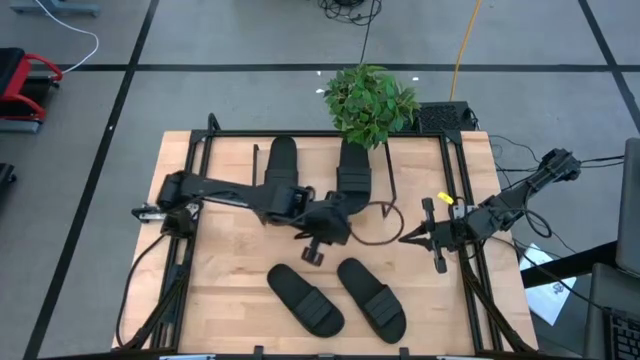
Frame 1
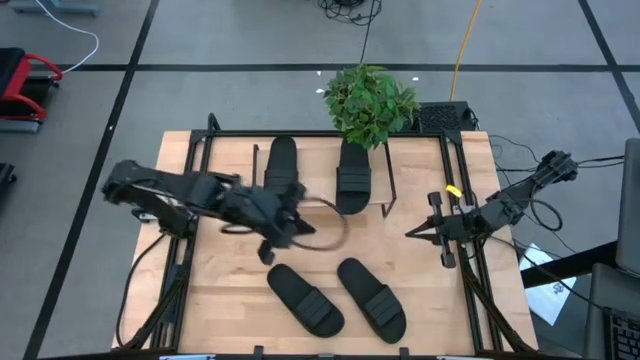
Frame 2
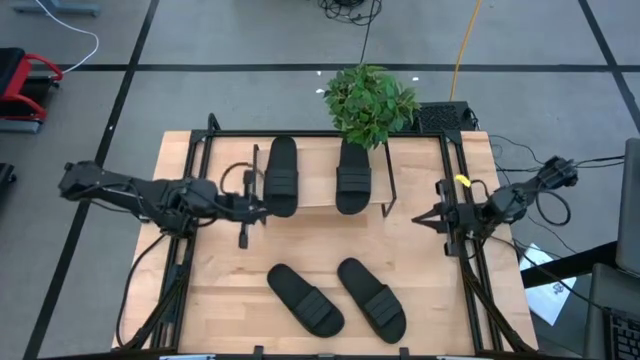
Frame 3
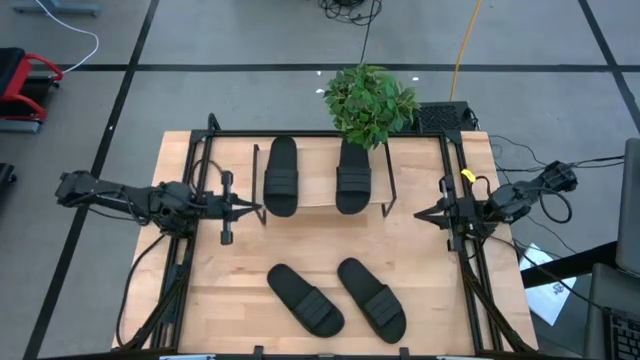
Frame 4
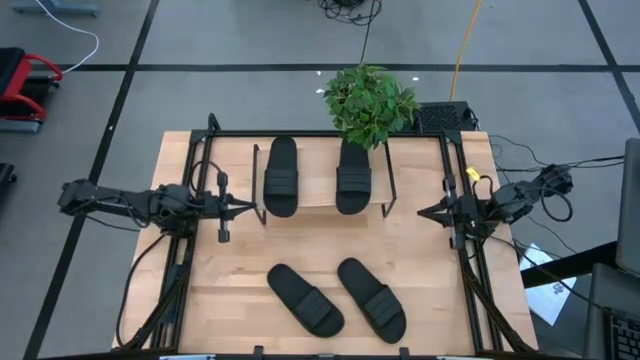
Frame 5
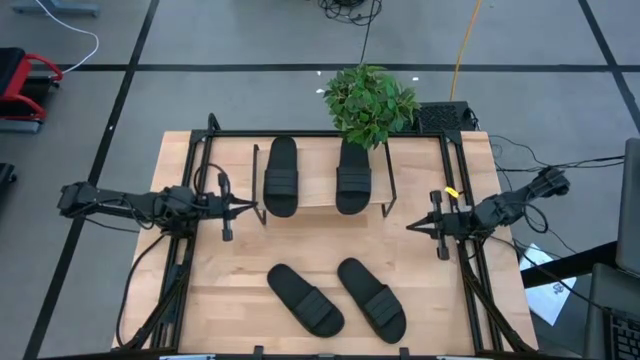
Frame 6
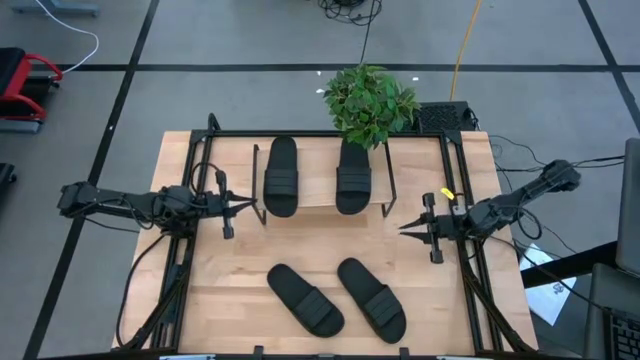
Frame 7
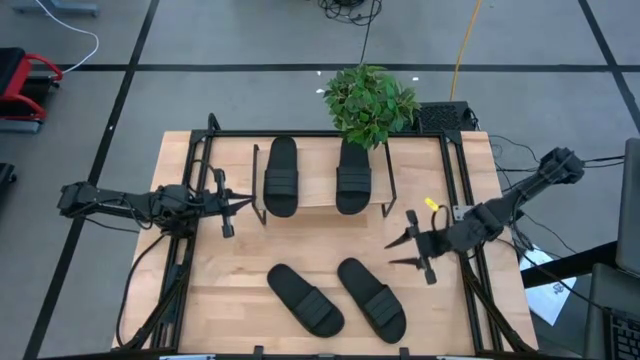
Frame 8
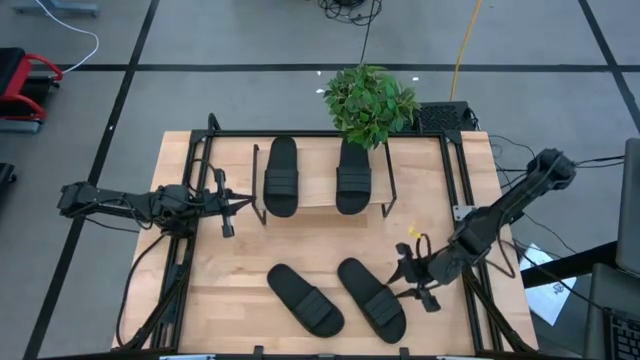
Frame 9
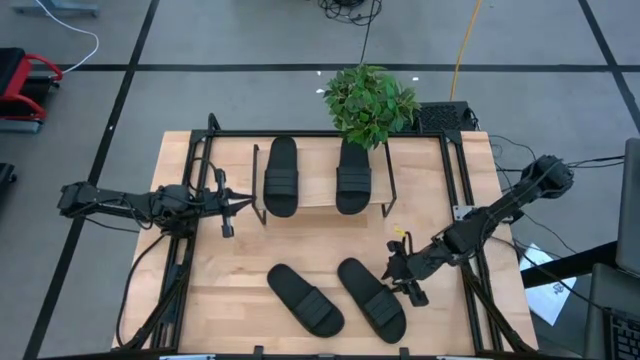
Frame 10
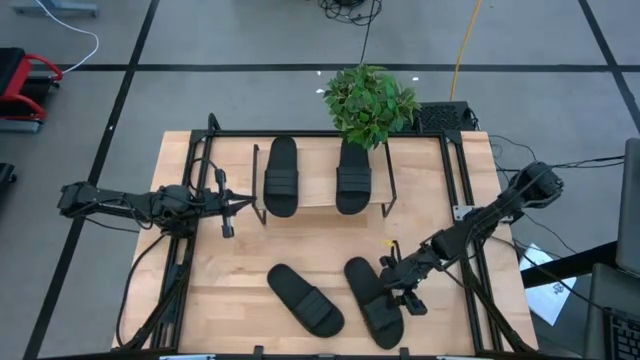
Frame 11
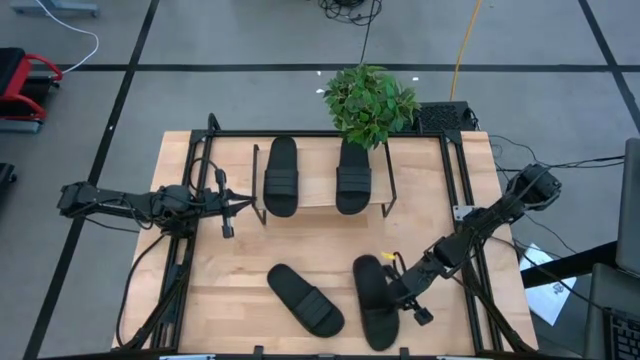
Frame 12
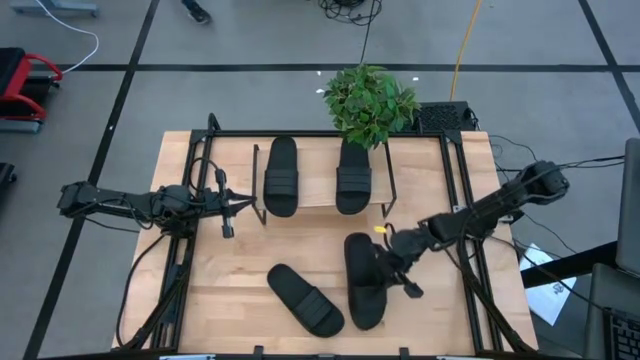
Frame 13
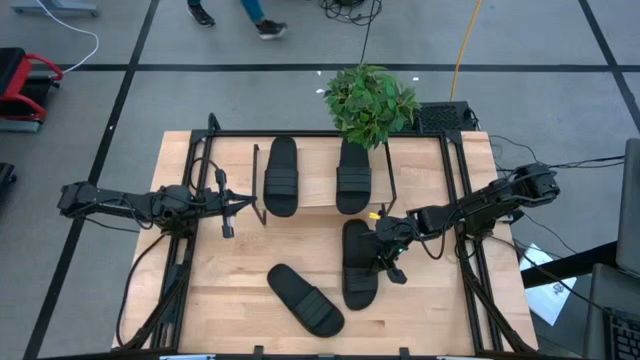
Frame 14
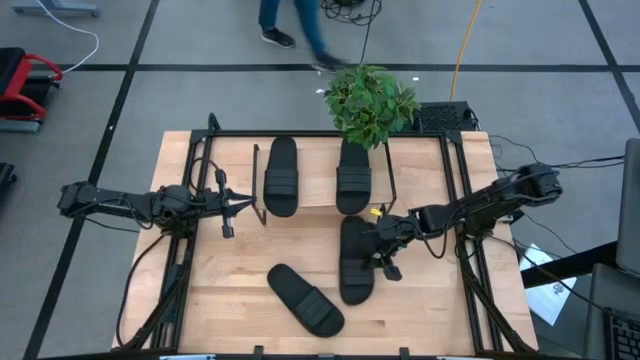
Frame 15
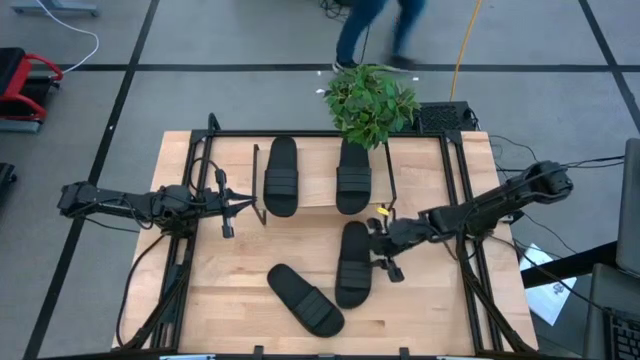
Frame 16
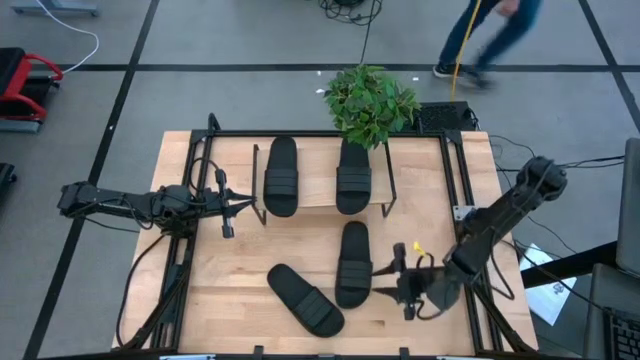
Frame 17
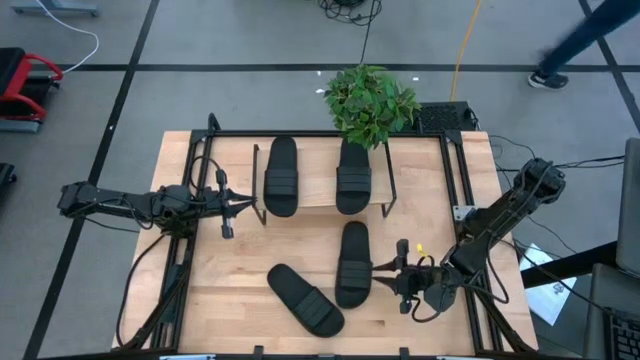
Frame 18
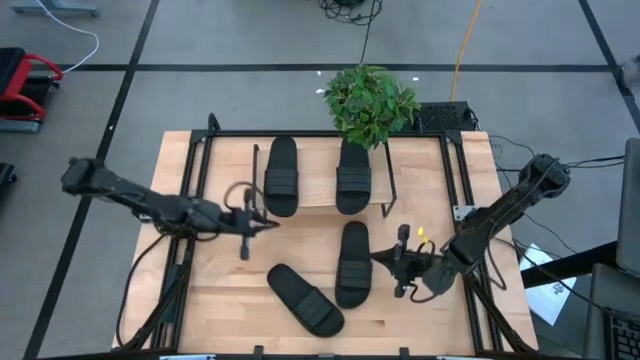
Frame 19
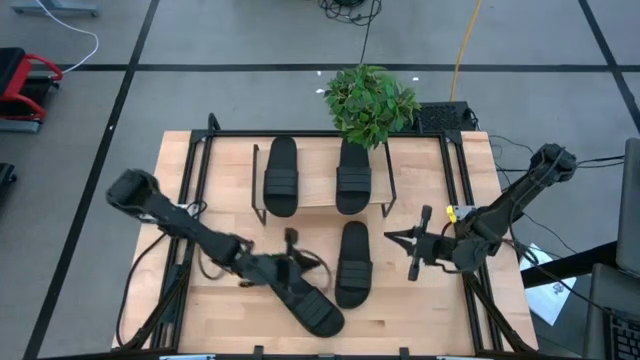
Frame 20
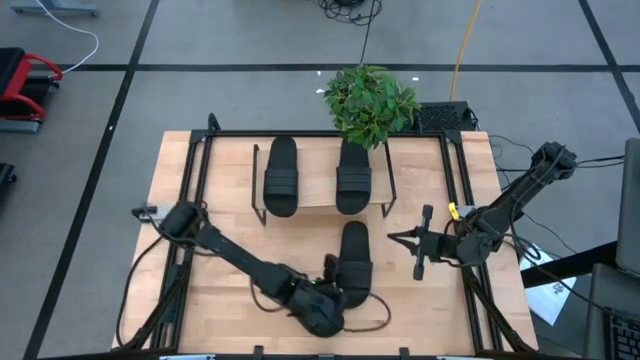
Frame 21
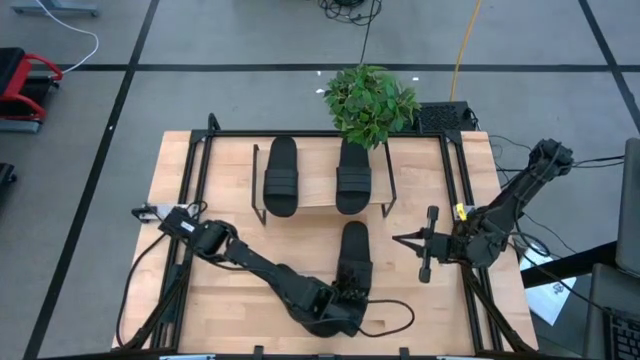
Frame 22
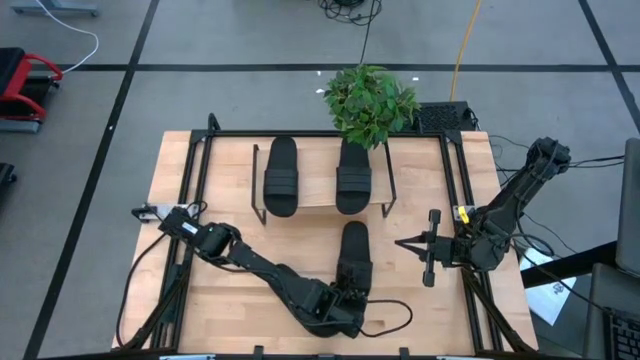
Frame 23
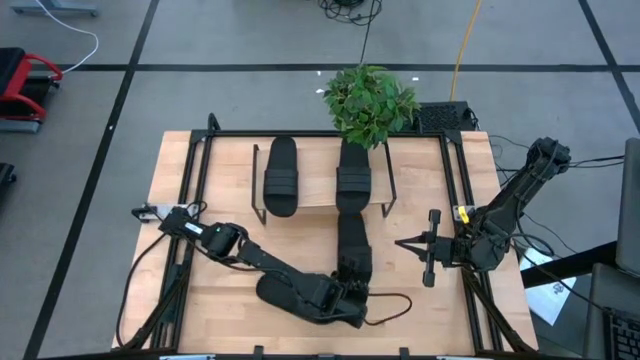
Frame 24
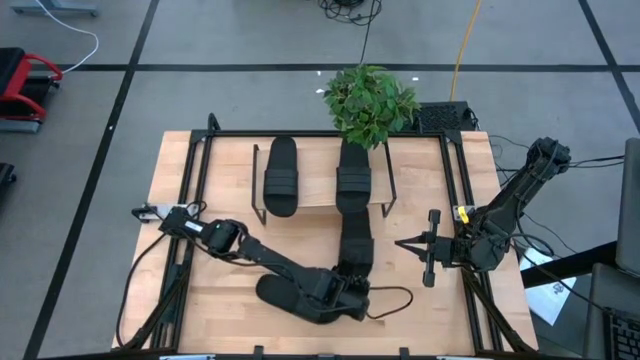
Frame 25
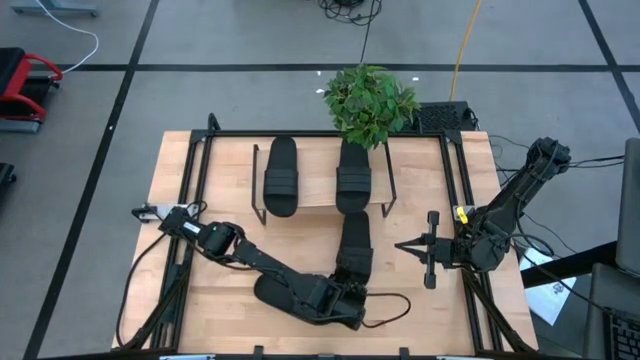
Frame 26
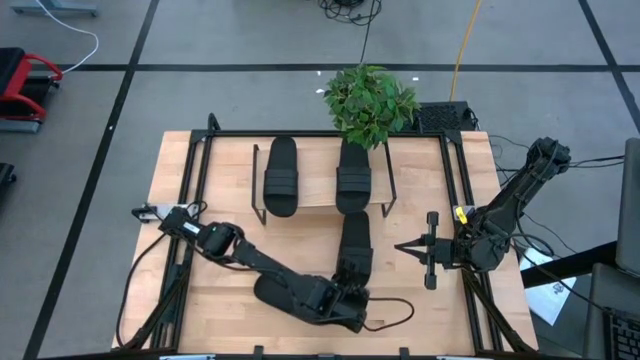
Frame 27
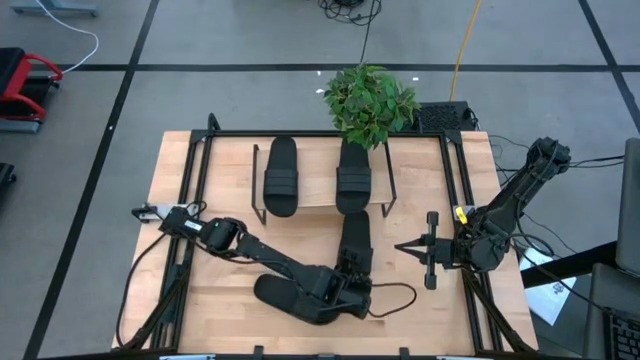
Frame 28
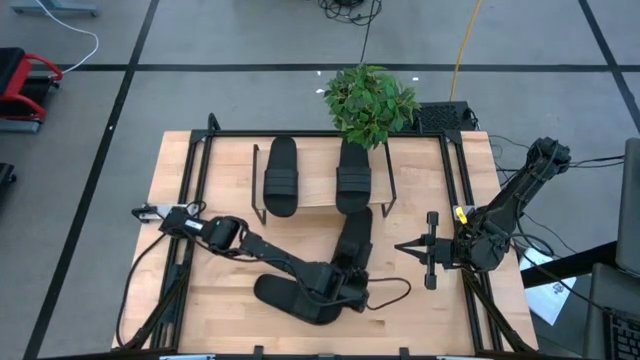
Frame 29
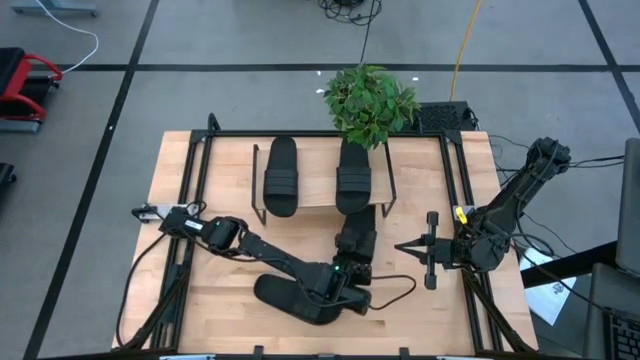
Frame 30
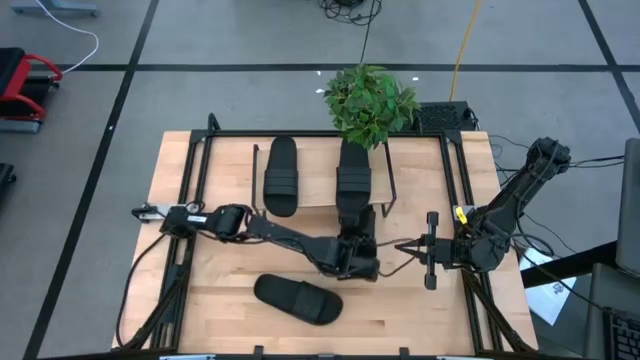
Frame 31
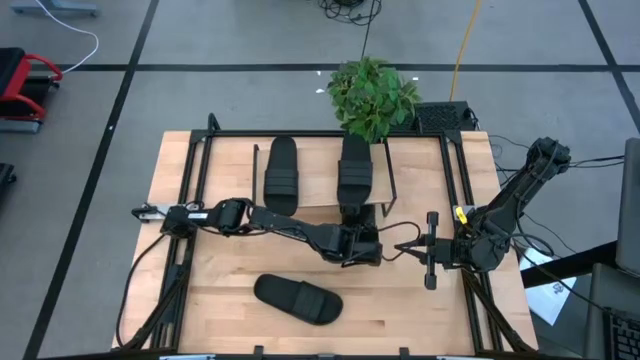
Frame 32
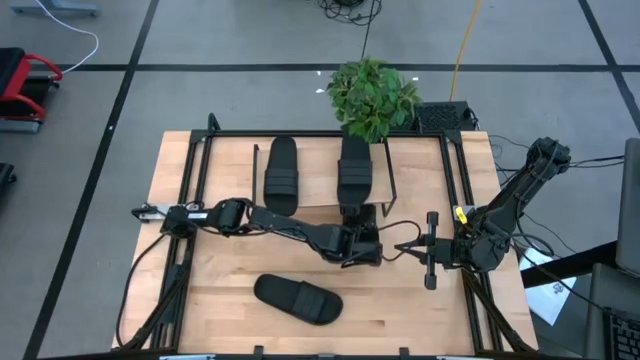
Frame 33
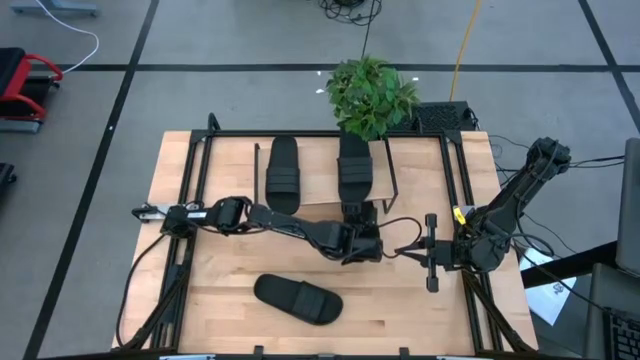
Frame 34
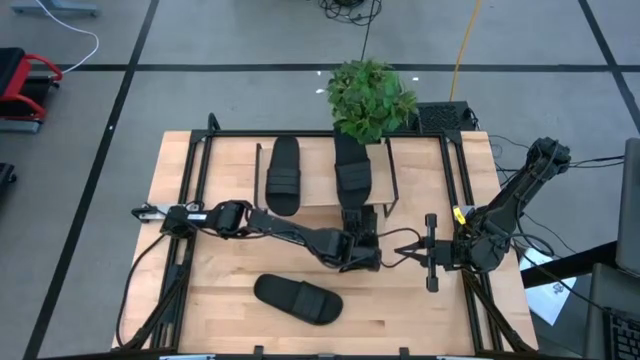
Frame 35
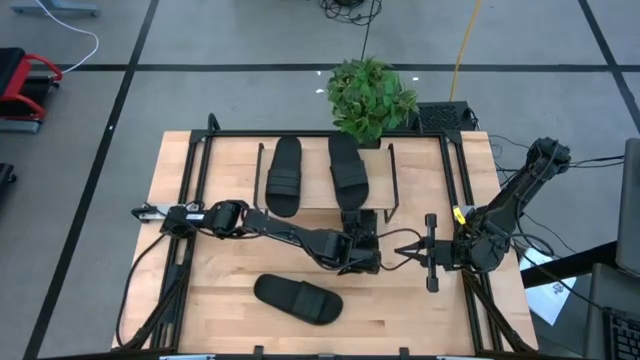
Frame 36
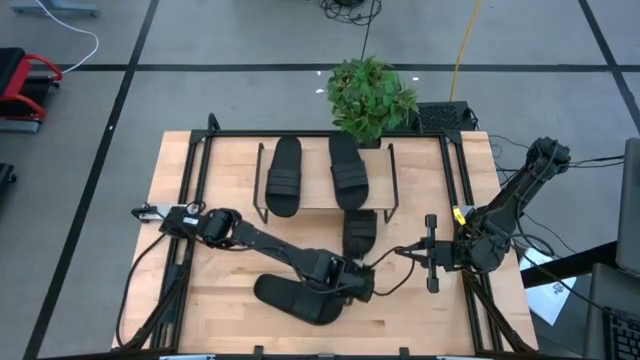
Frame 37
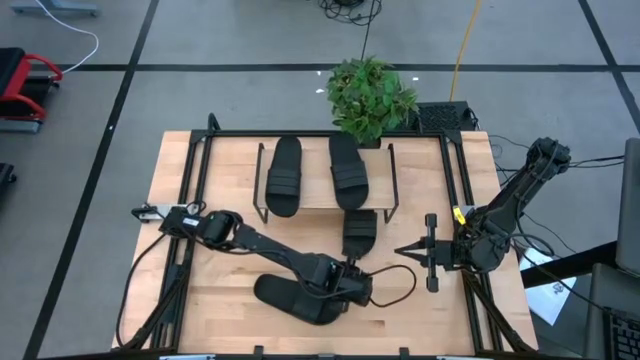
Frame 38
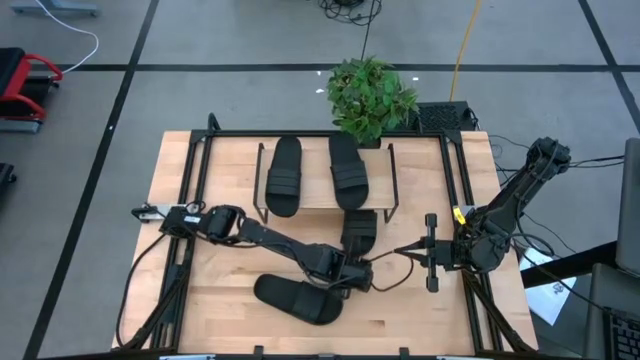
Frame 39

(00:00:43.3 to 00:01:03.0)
Task: Pick and place slides into the shelf
Put the black slide under the shelf

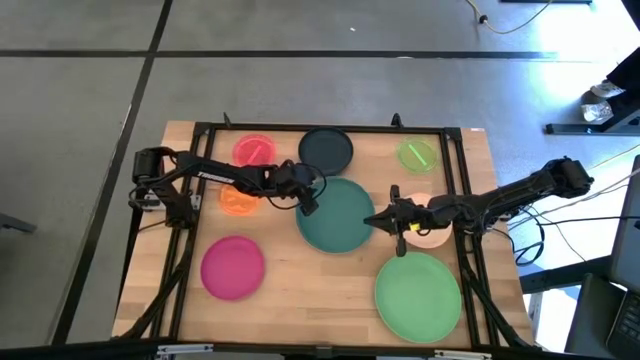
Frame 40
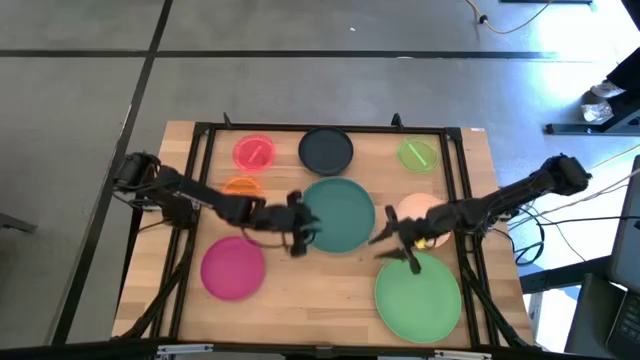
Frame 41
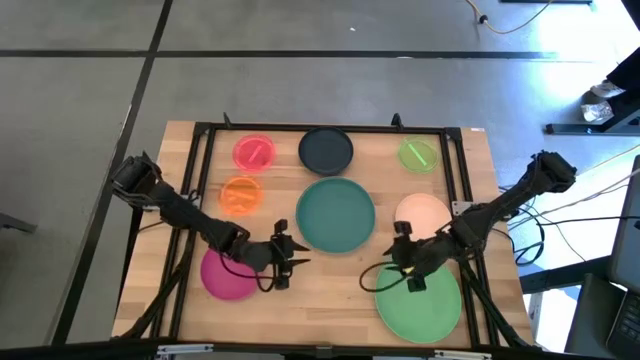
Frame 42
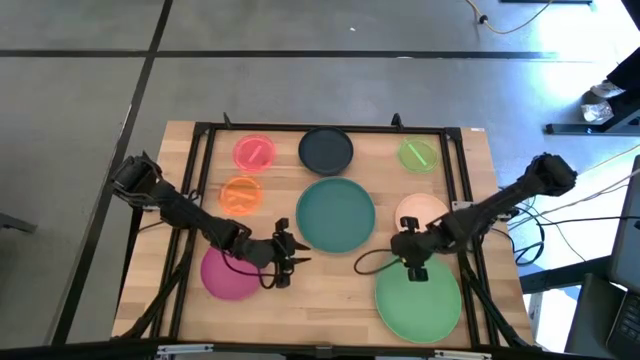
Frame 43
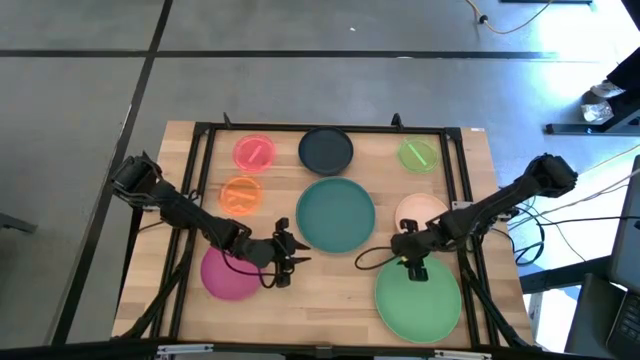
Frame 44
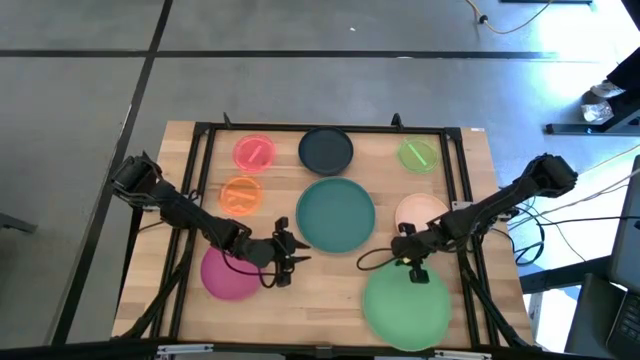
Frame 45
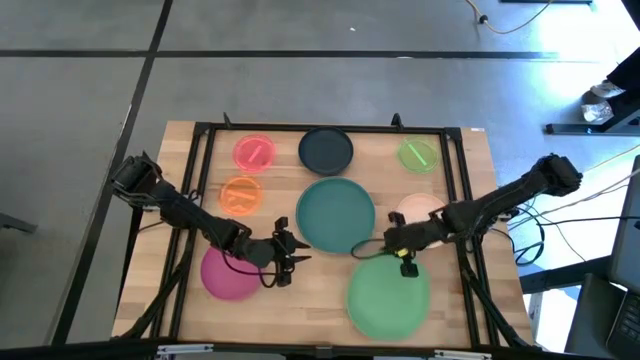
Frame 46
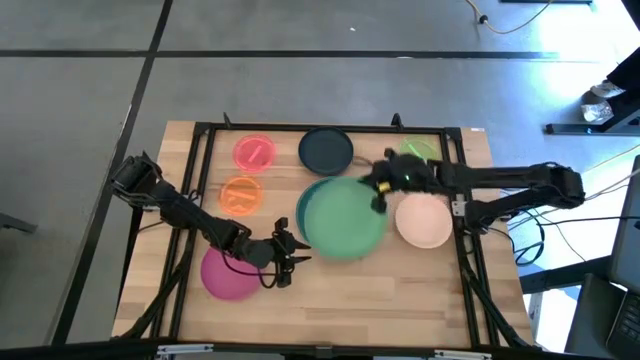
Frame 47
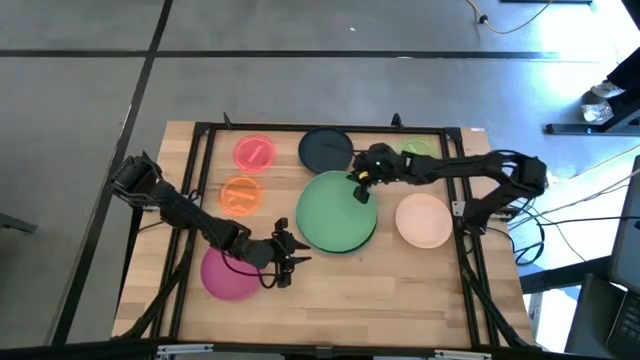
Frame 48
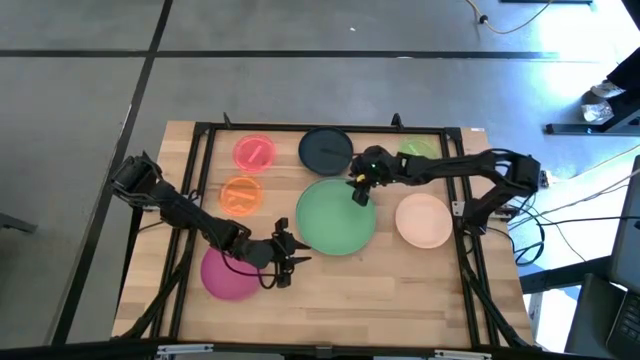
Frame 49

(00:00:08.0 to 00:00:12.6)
Task: Stack plastic plates
Stack the light green plate on top of the dark green plate
